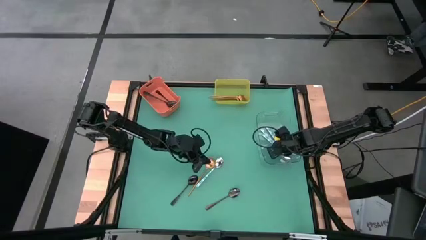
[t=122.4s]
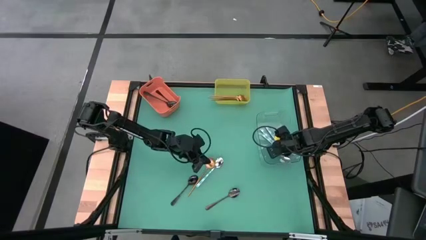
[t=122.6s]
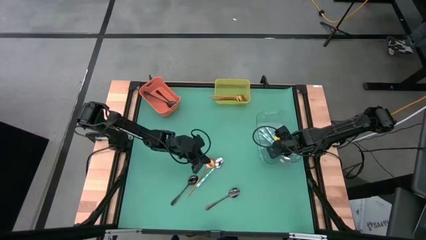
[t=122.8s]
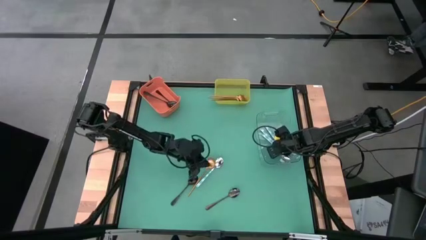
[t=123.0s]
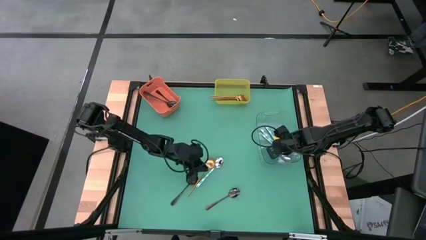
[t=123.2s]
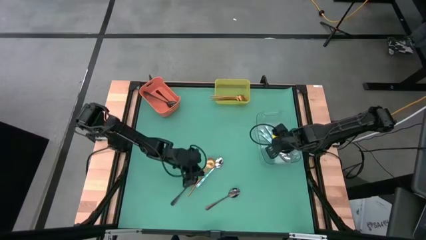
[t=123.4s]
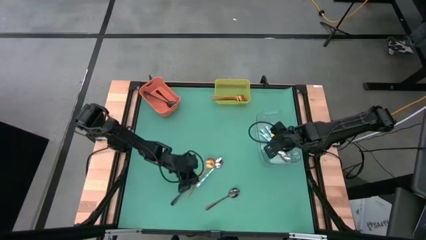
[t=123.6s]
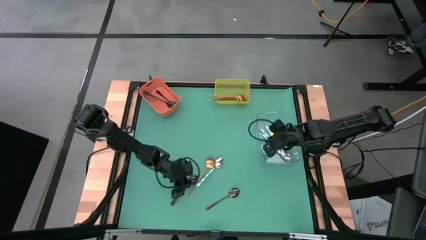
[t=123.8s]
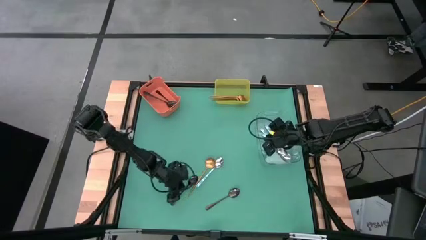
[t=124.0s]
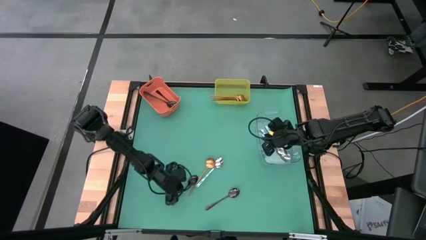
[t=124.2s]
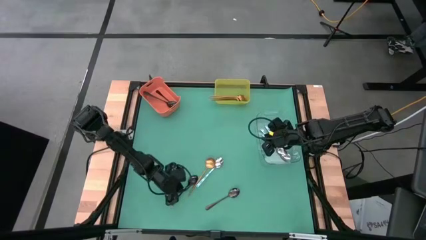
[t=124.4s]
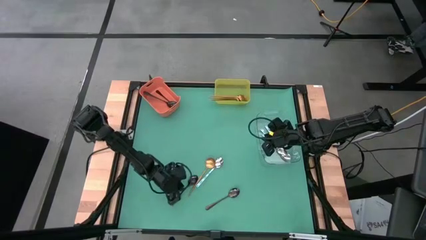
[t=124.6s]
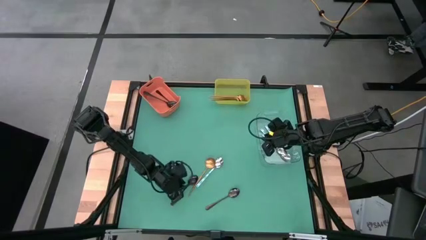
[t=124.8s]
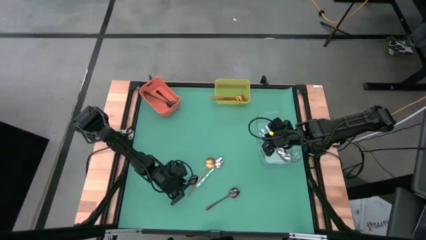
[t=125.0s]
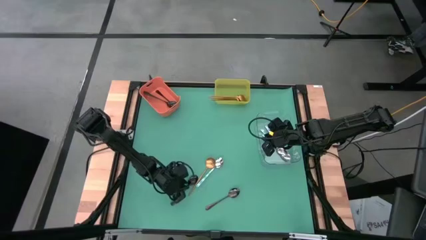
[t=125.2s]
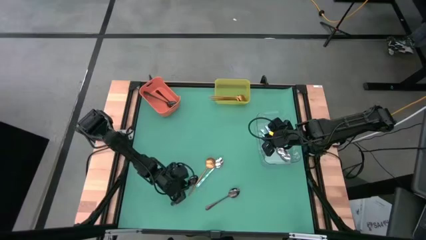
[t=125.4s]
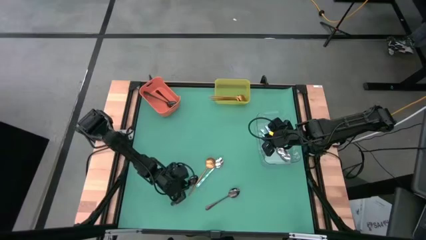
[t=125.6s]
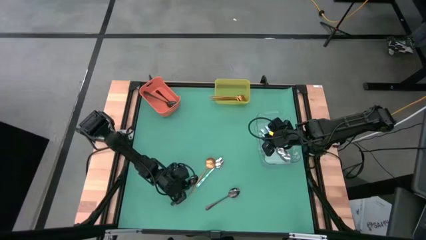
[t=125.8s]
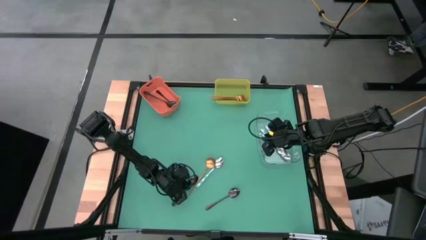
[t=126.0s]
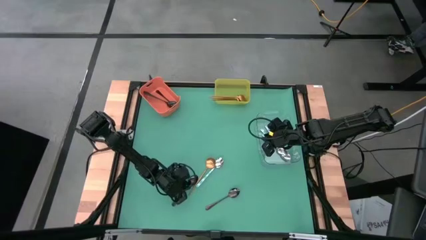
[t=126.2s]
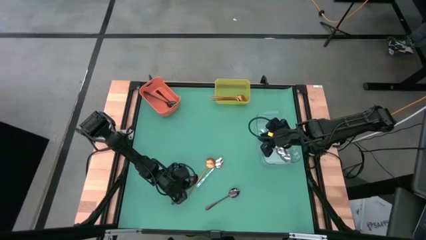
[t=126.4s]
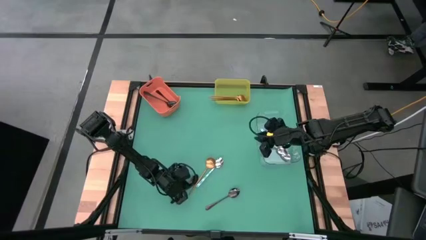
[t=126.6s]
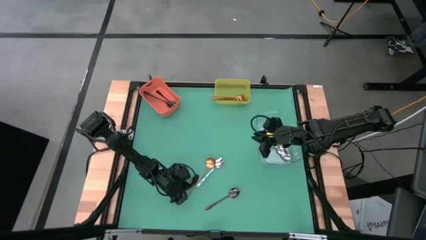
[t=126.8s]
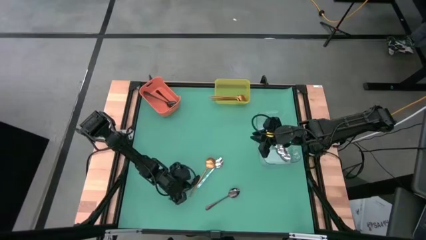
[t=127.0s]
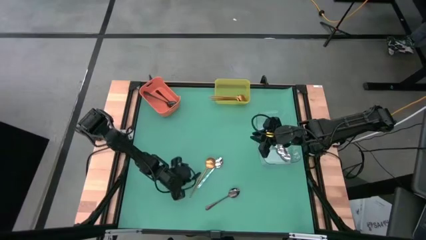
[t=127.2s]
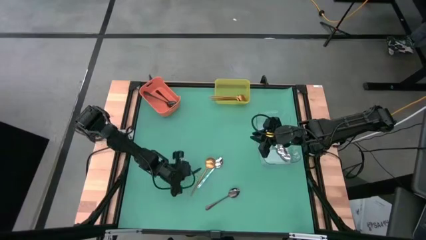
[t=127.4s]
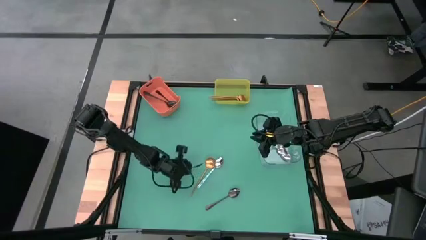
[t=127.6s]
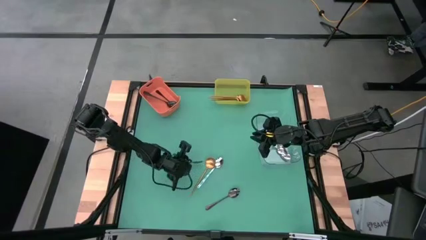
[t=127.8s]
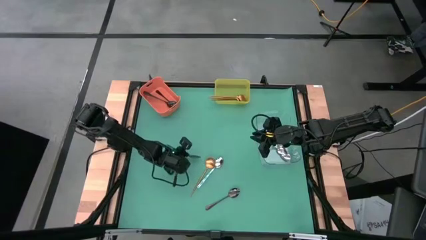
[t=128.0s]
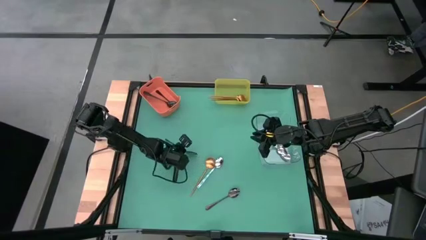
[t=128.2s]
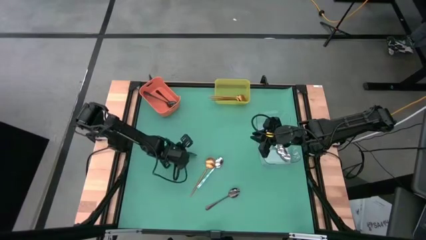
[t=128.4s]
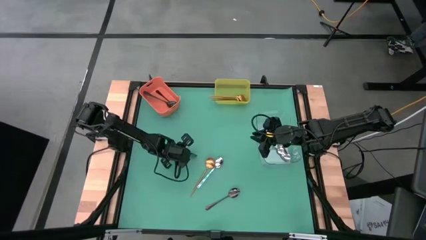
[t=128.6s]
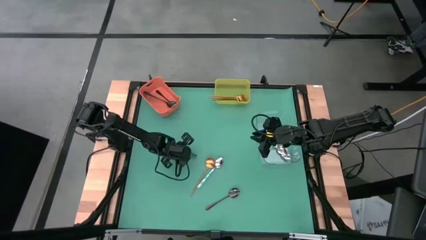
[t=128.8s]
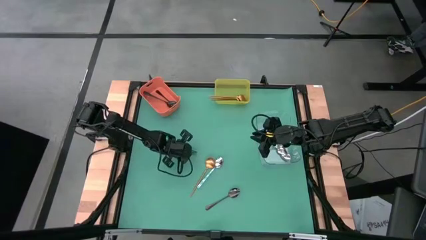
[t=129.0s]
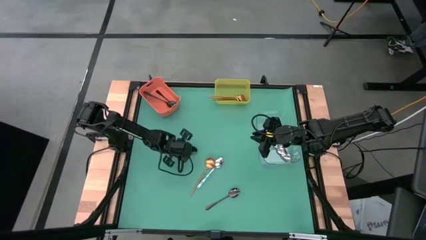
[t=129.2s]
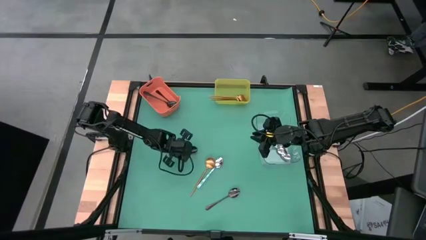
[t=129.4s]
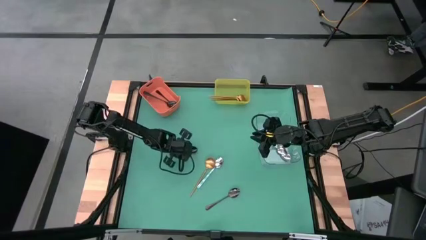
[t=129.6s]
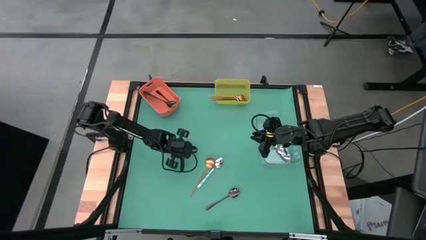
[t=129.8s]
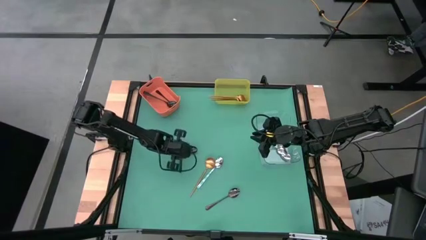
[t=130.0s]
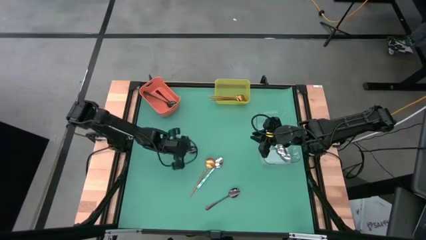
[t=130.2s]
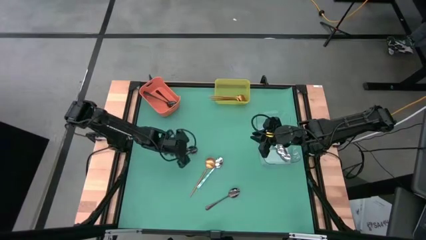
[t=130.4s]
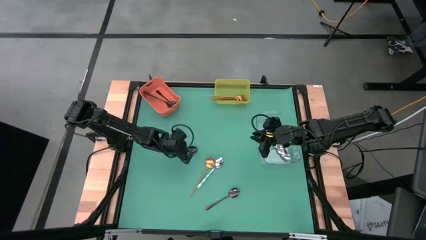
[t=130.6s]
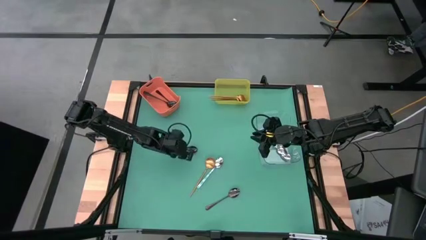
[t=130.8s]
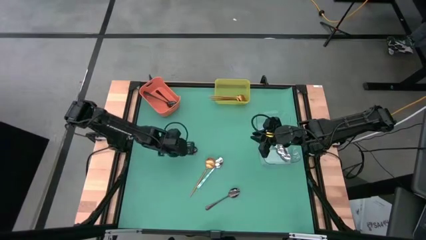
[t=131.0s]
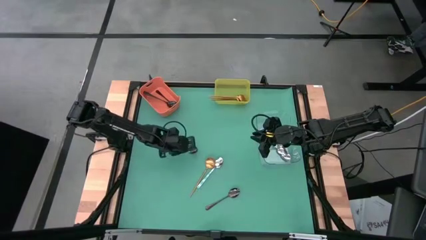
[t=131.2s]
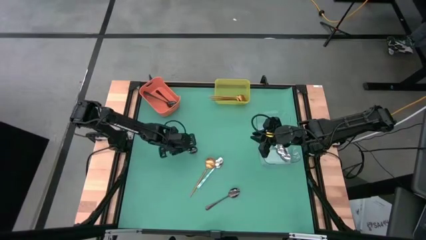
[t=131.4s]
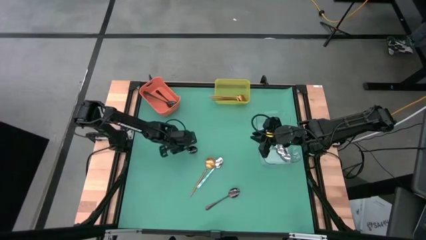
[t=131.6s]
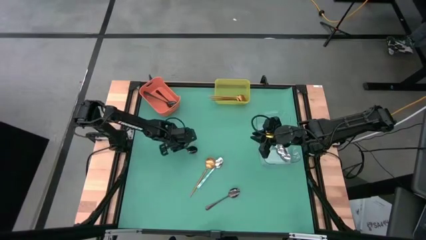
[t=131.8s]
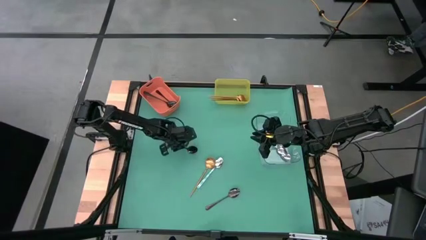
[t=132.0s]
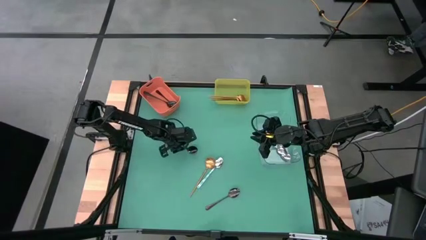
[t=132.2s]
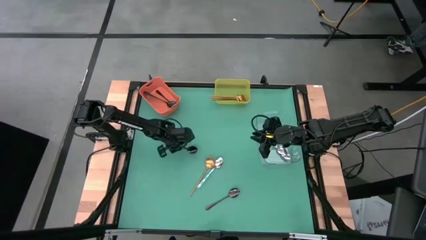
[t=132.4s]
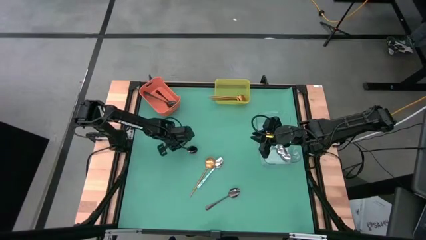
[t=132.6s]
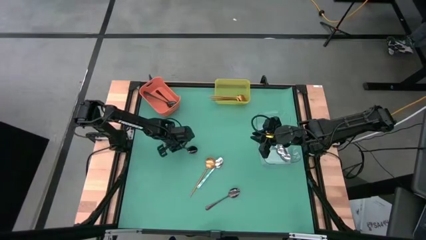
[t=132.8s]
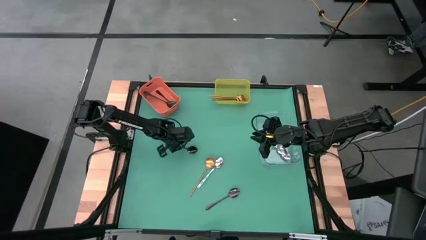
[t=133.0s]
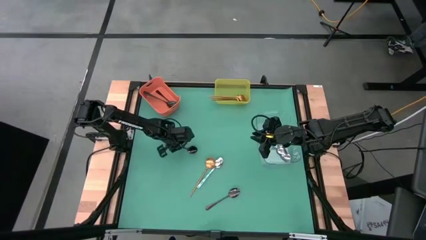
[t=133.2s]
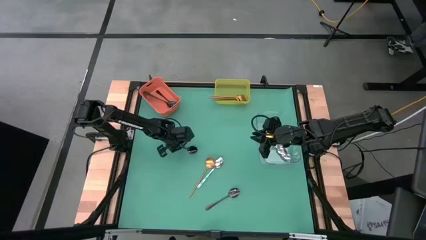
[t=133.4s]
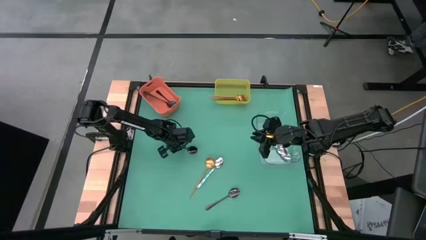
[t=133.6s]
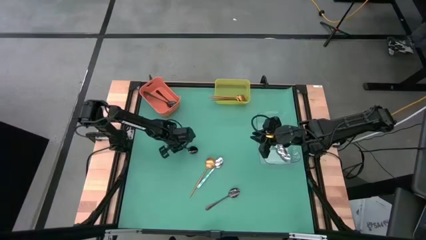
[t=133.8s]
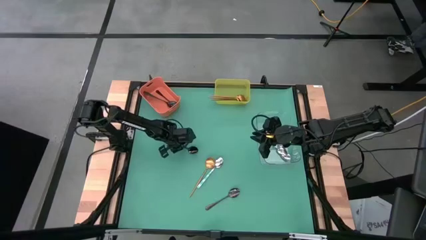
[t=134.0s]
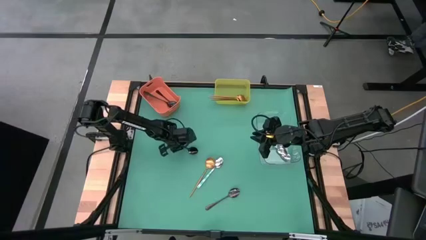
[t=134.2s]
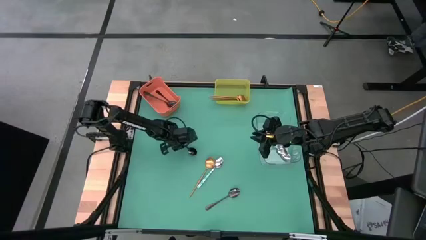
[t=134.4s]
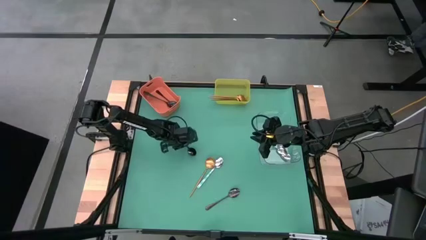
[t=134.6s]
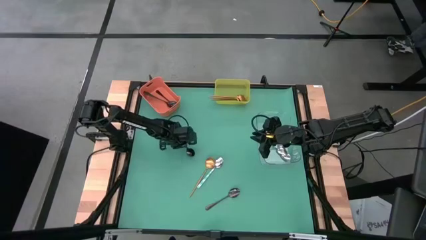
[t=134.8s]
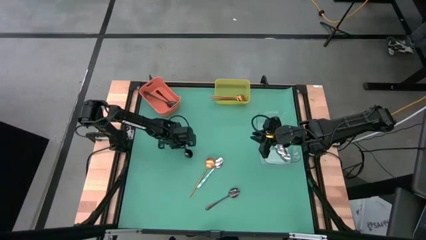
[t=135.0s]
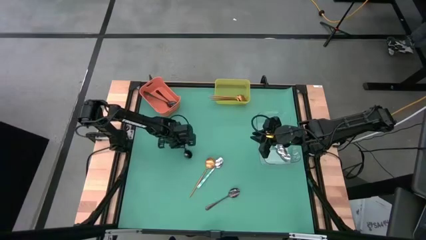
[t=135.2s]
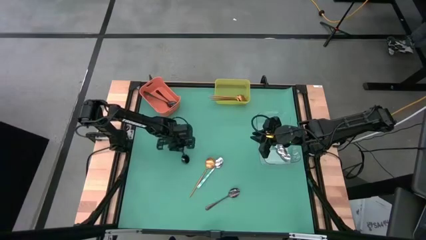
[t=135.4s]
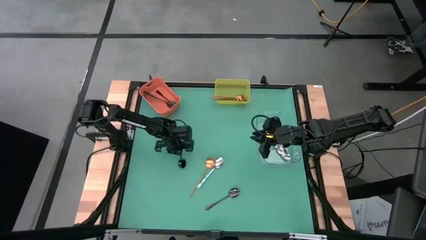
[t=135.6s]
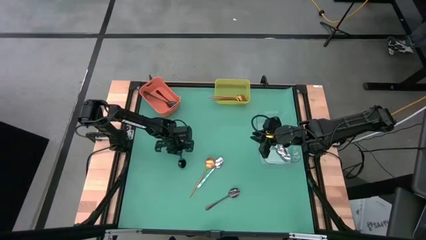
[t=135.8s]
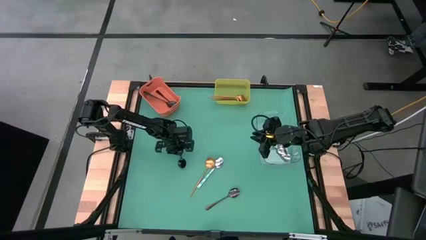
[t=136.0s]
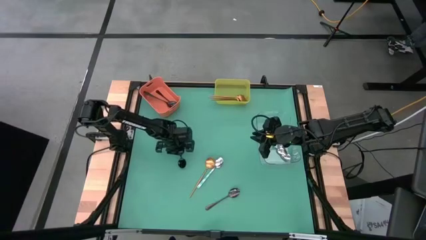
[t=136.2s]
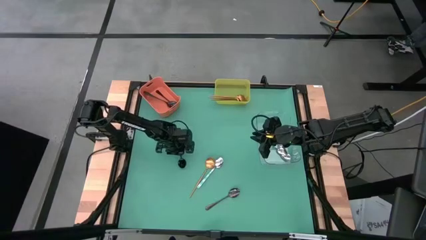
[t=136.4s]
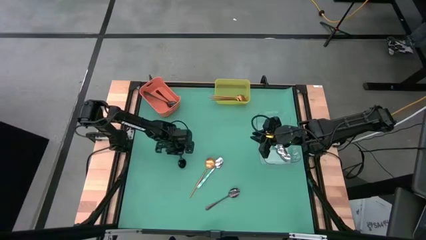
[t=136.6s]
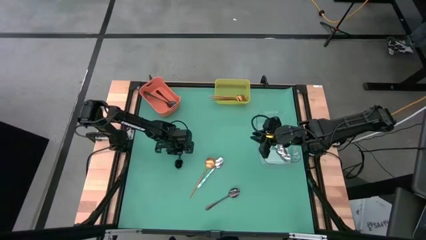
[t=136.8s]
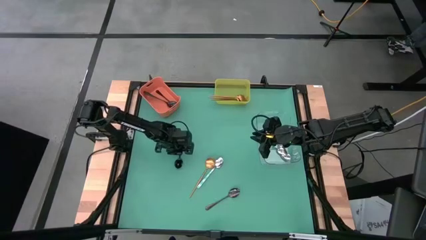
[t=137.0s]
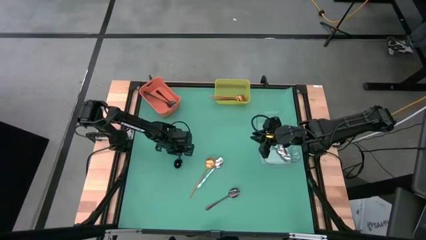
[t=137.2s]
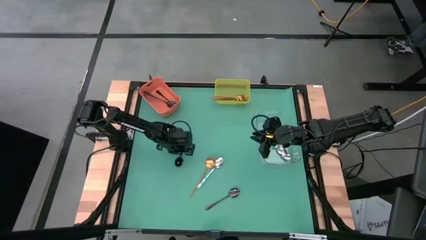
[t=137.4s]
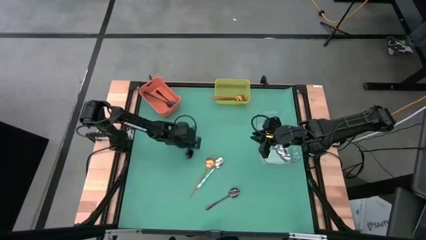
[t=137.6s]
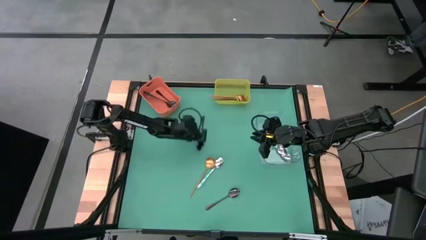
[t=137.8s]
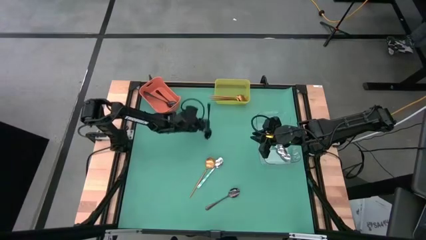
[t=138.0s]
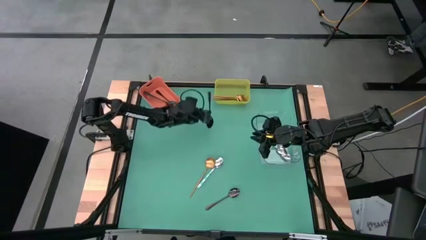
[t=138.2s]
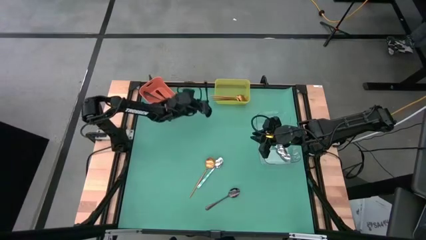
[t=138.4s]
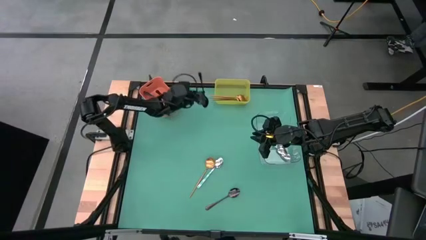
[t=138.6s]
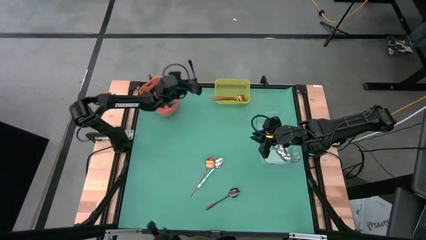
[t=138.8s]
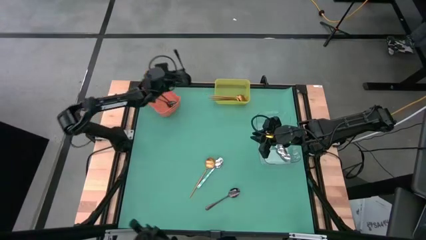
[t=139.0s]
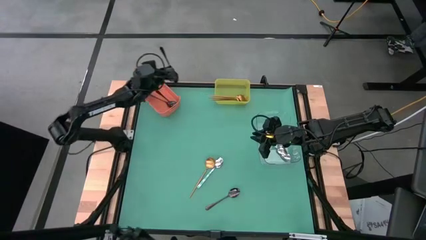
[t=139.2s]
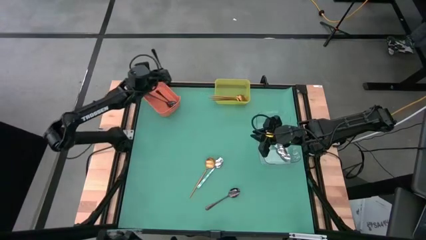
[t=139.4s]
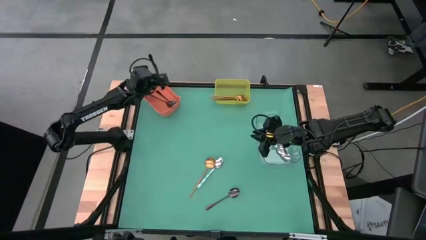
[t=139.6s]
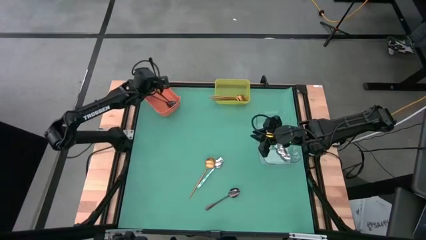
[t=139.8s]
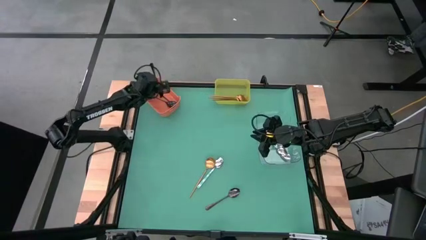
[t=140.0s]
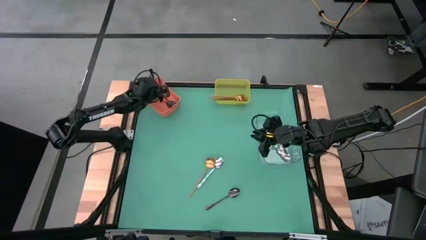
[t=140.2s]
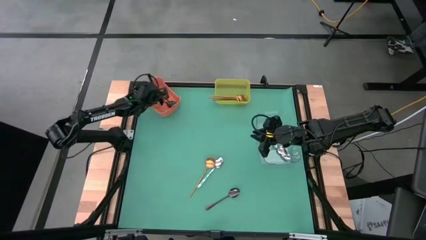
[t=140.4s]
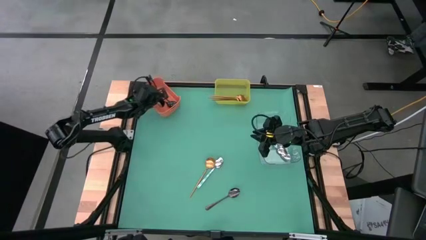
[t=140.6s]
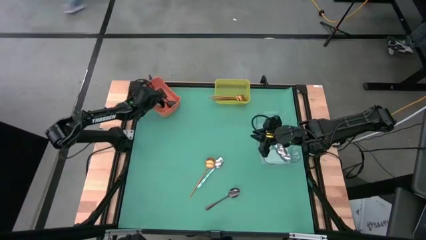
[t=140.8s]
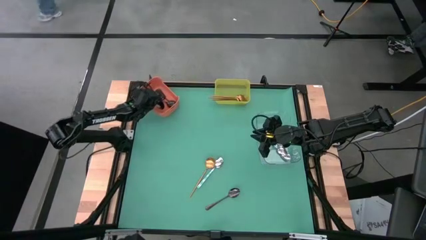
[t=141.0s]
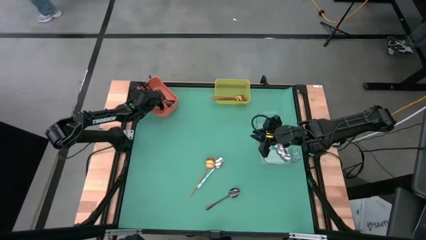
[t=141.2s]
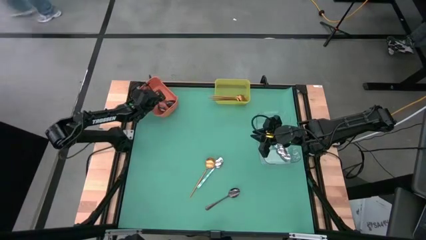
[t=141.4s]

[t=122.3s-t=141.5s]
Task: Sort silverware by color (type)
Put the black spoon into the orange bin
